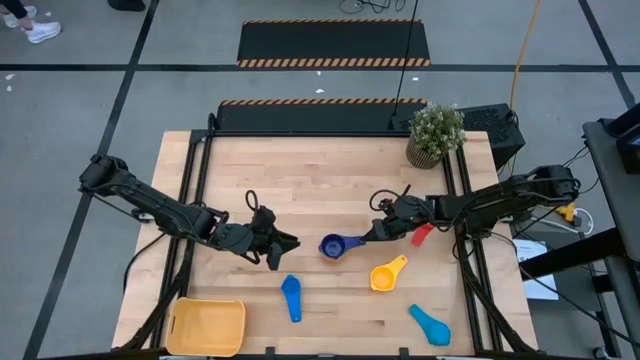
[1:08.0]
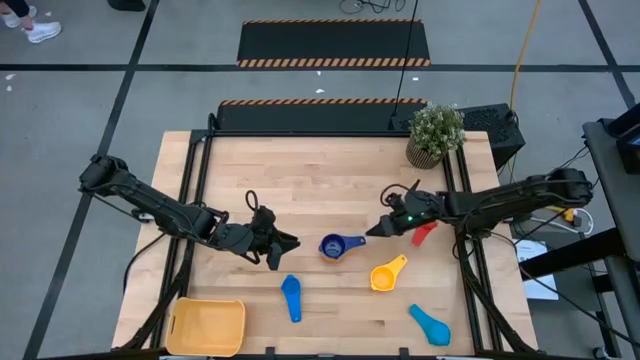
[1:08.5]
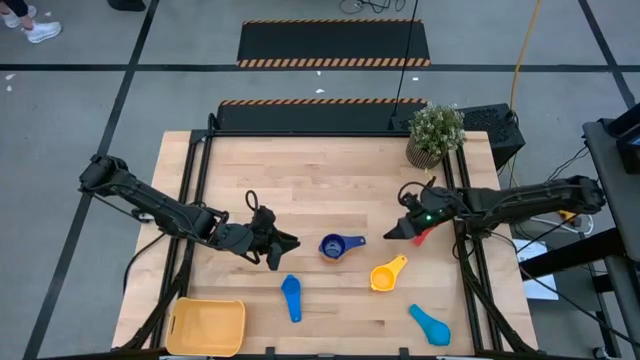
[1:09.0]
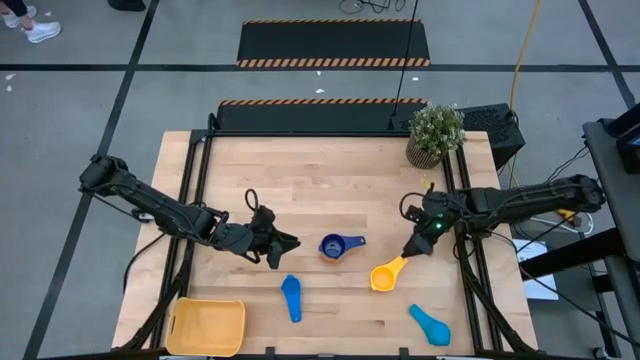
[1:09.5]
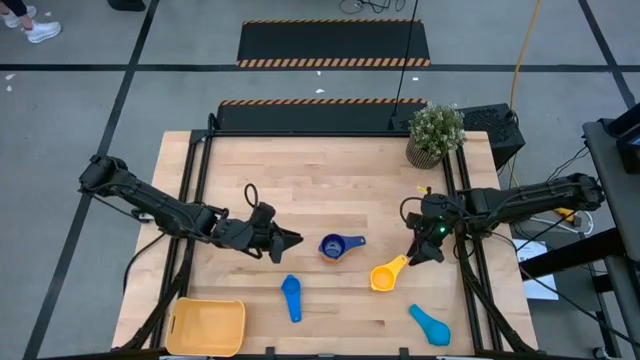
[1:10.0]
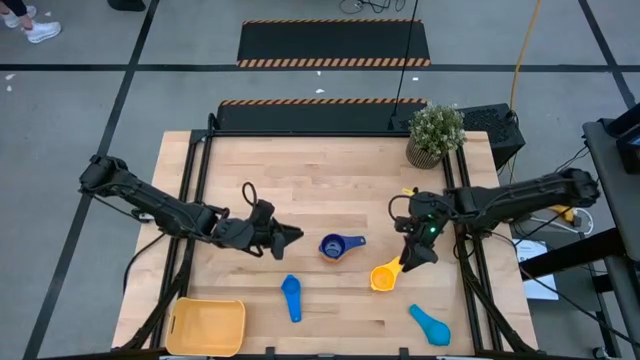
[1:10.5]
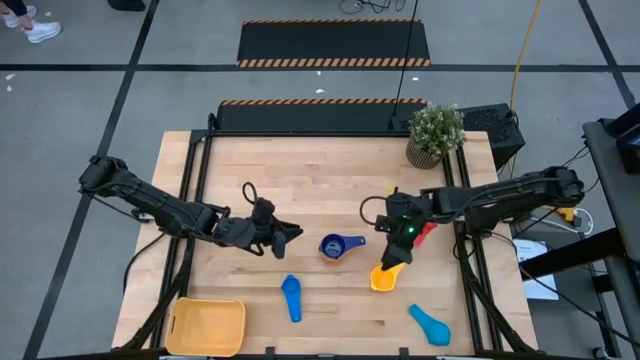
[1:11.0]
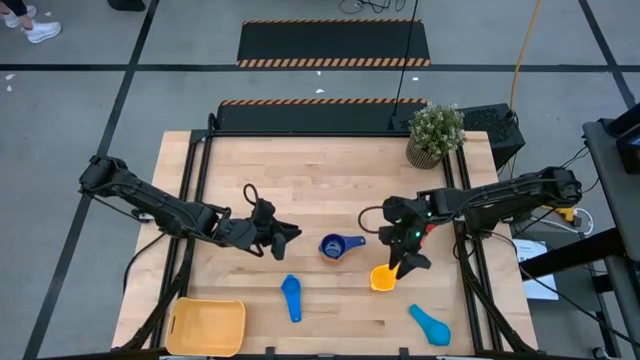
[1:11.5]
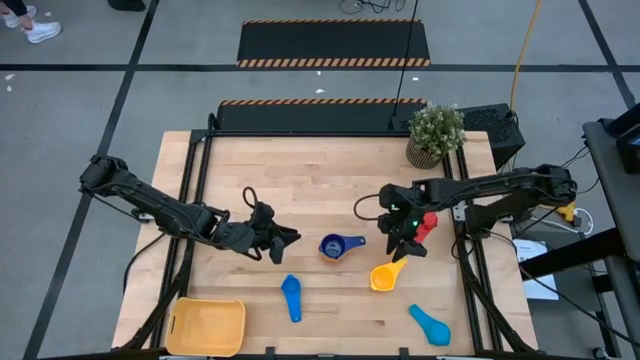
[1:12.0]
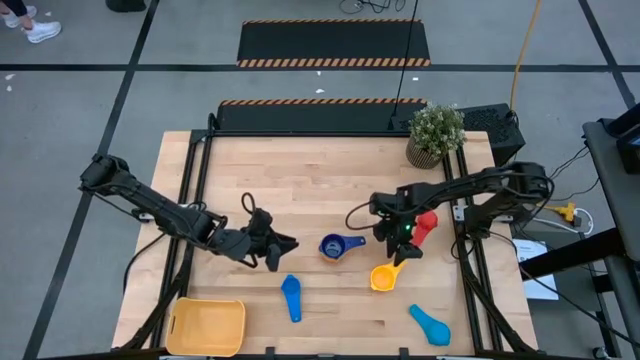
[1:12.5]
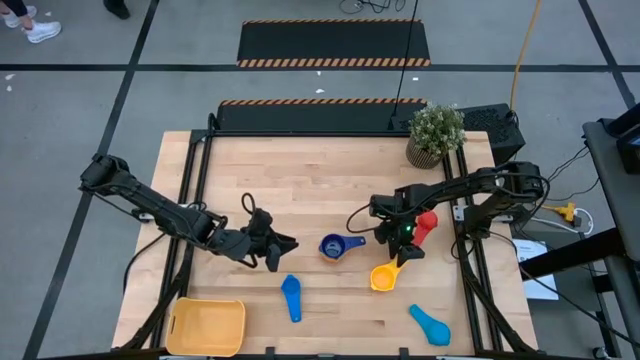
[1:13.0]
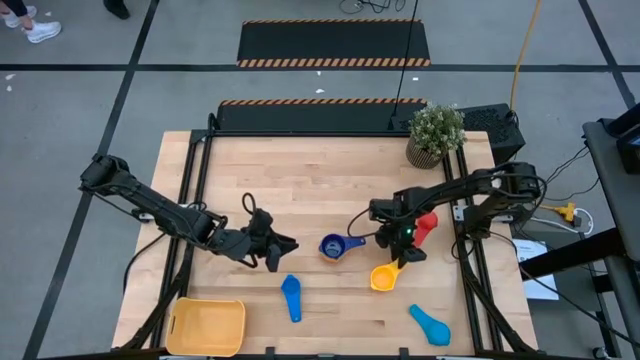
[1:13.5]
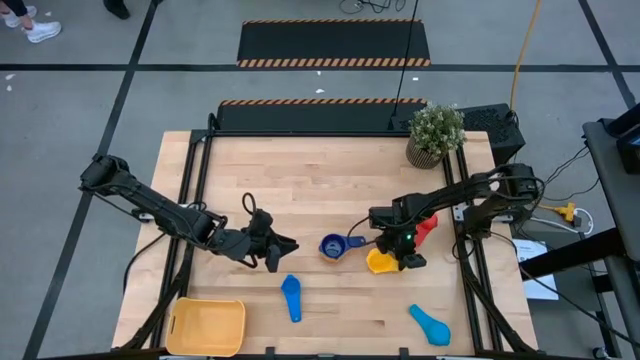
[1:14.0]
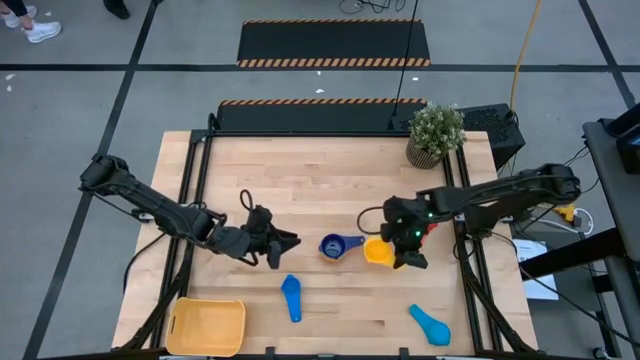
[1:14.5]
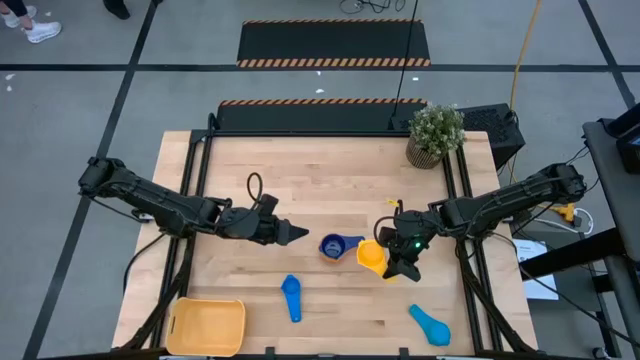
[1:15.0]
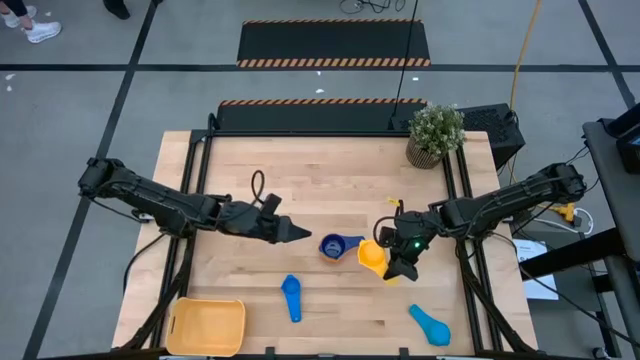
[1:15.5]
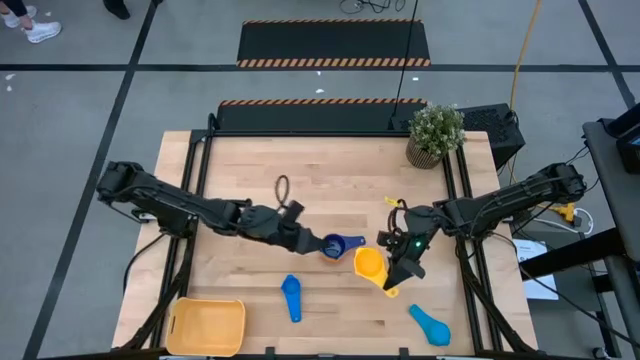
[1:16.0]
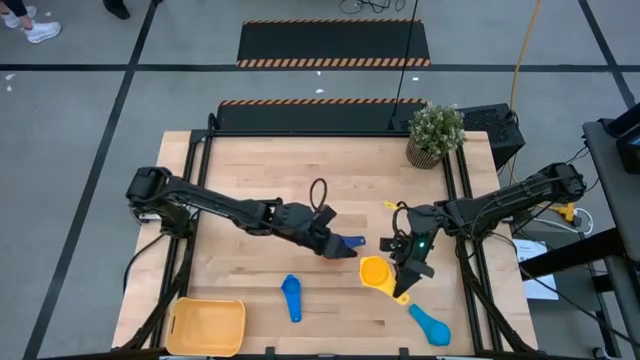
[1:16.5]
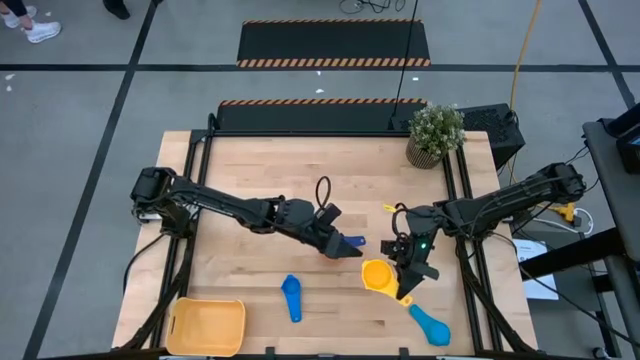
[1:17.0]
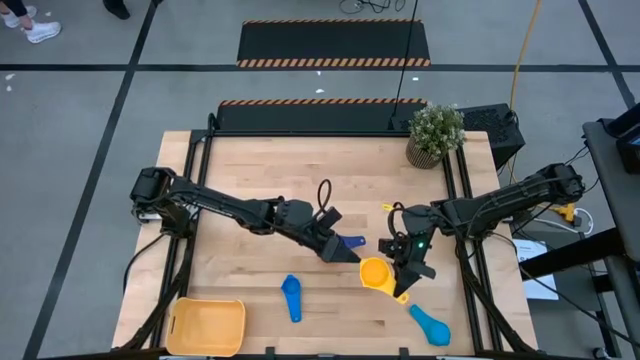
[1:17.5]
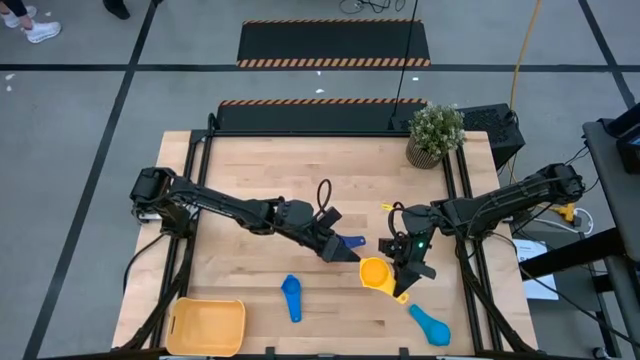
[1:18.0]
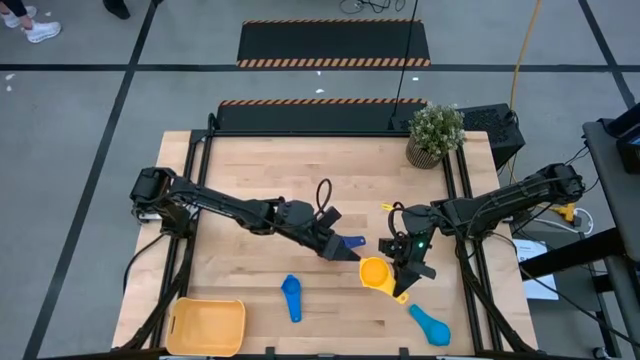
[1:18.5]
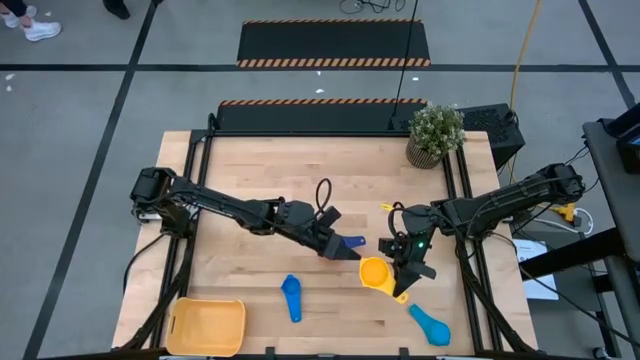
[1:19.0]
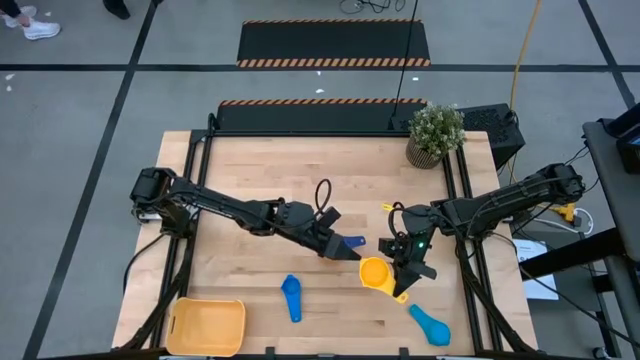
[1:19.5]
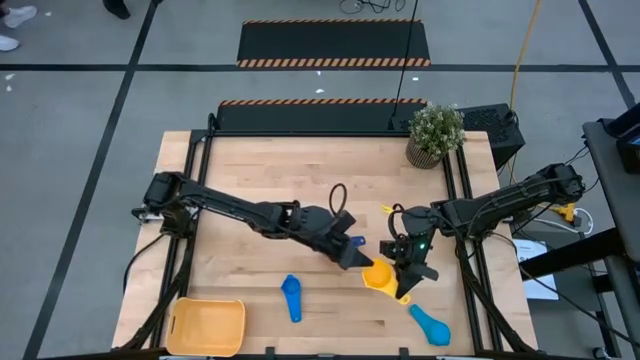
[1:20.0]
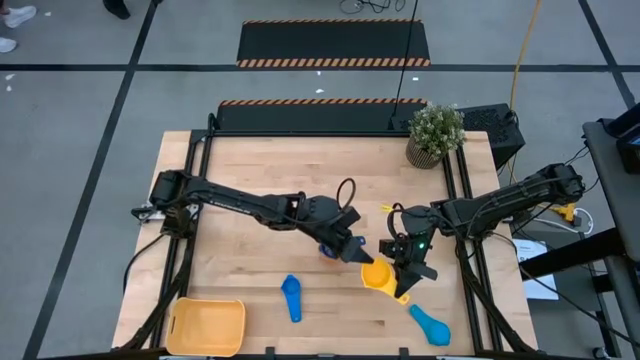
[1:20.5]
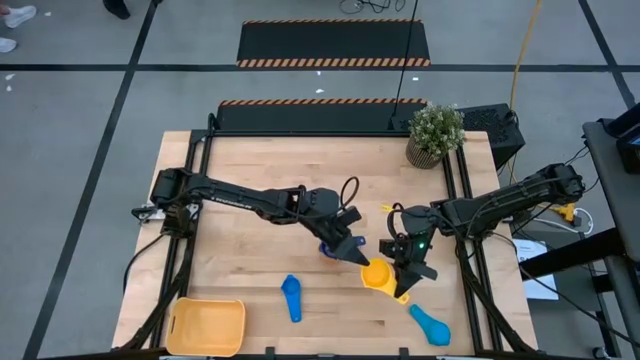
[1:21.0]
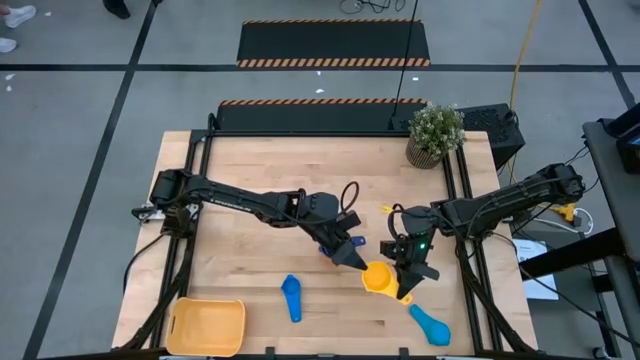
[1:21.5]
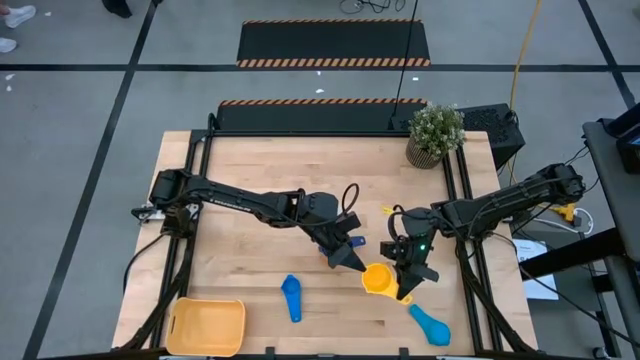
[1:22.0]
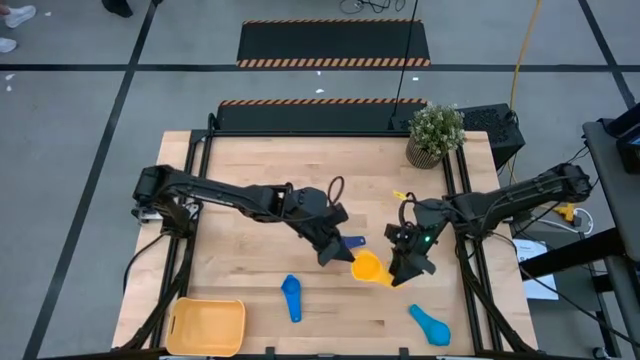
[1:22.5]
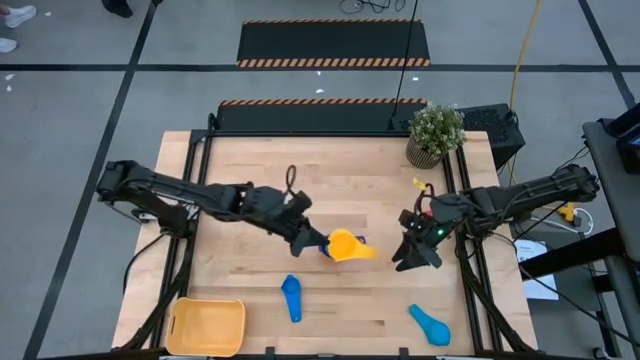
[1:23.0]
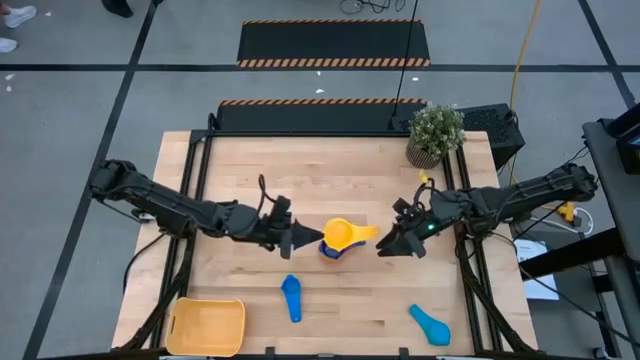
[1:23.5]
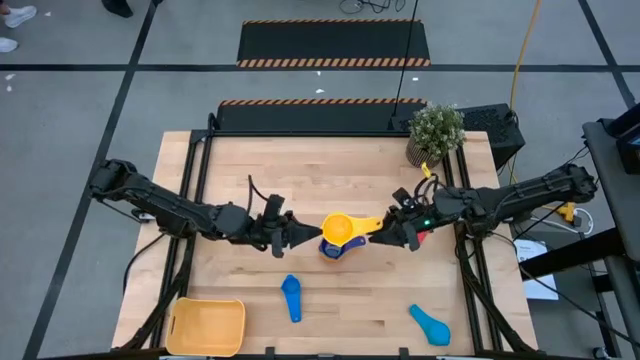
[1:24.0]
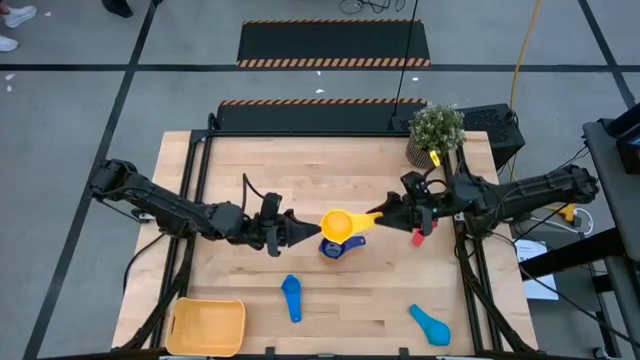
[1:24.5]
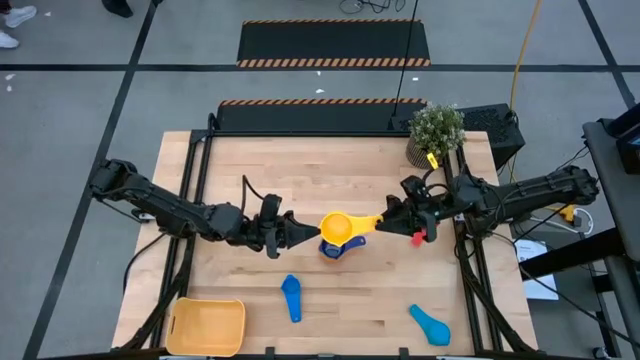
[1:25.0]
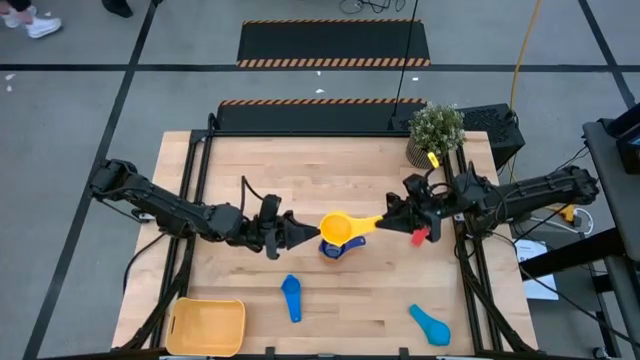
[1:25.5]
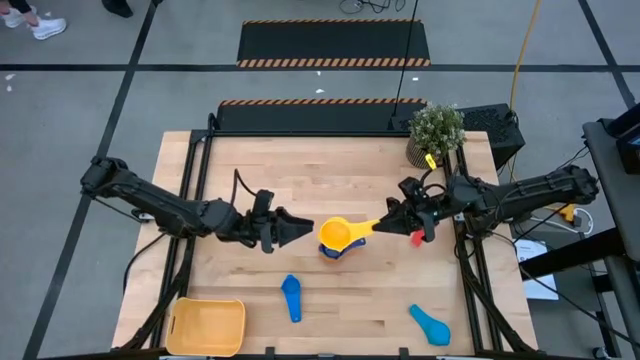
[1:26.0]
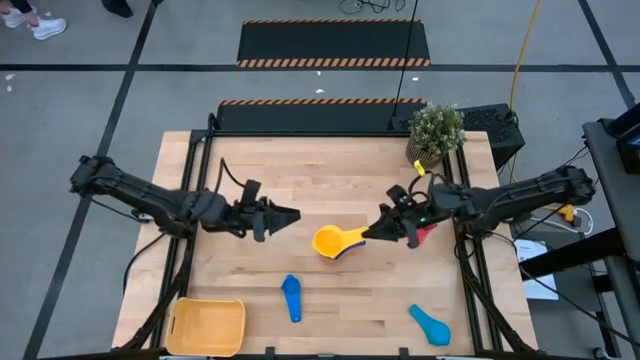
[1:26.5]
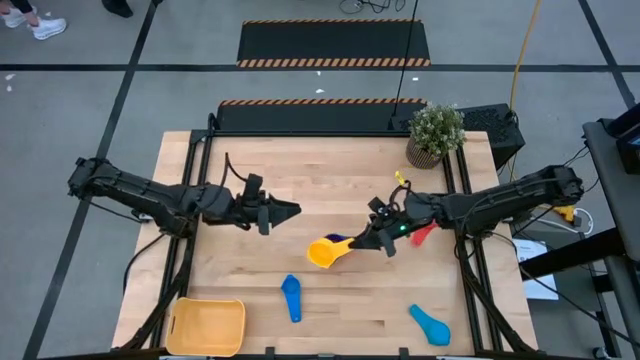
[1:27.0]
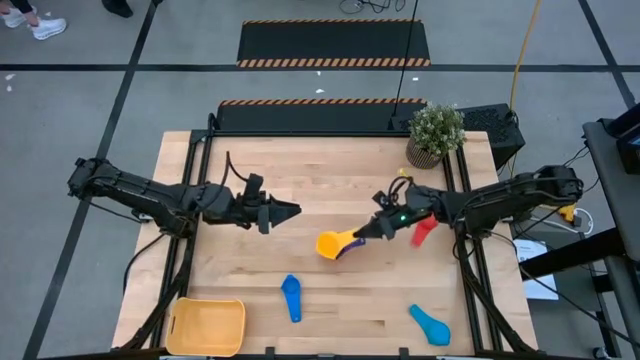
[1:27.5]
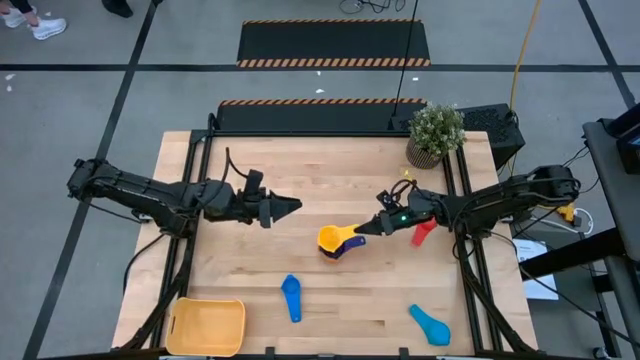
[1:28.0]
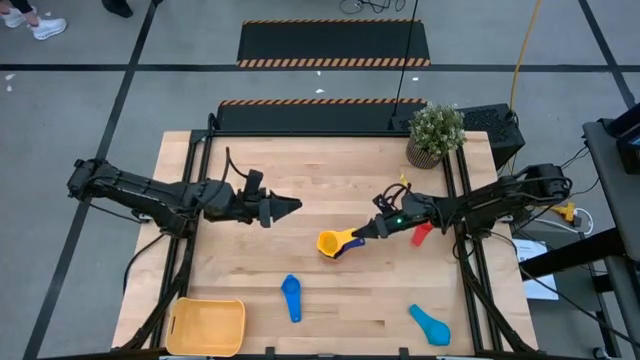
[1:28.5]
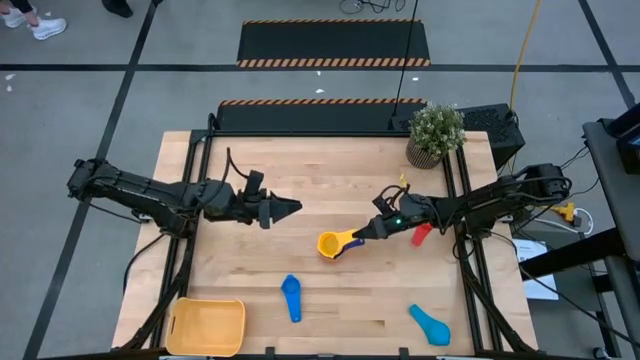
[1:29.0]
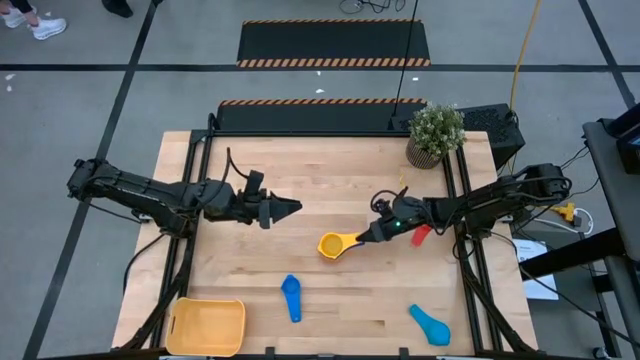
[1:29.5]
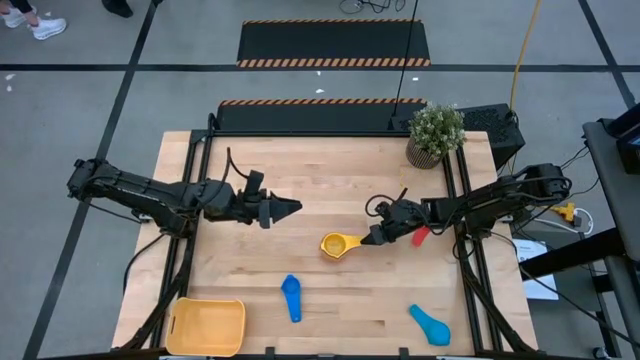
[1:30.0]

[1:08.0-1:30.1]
Task: Nest measuring cups in basket
Stack the yellow measuring cup on top of the dark blue measuring cup
